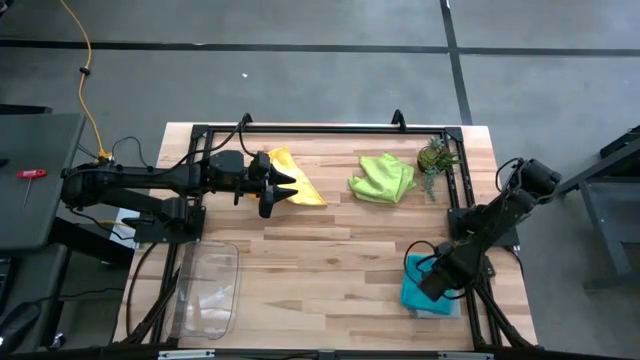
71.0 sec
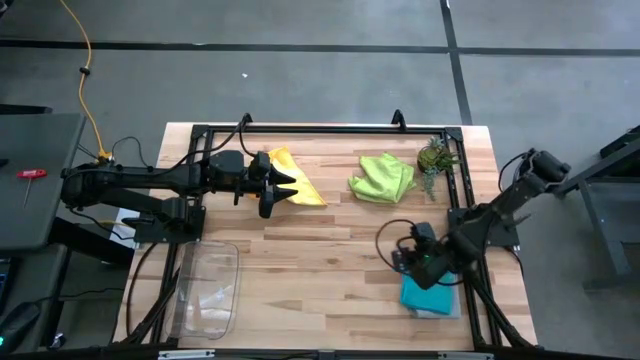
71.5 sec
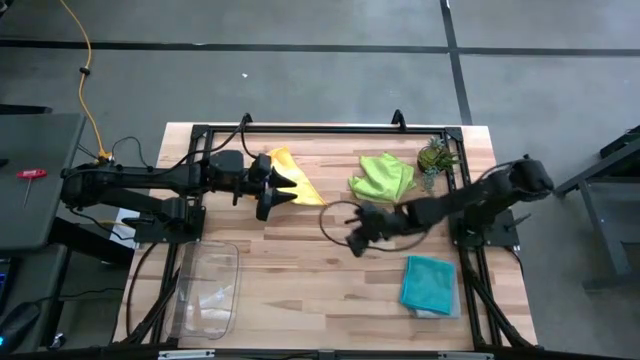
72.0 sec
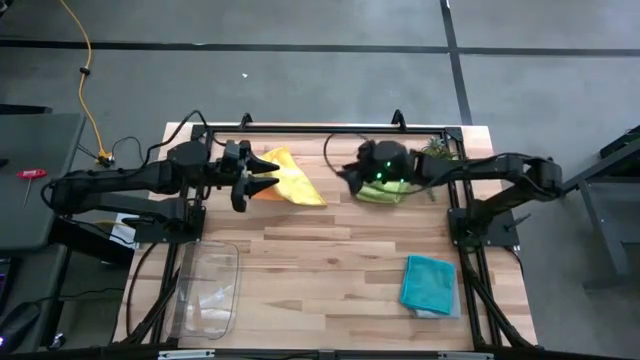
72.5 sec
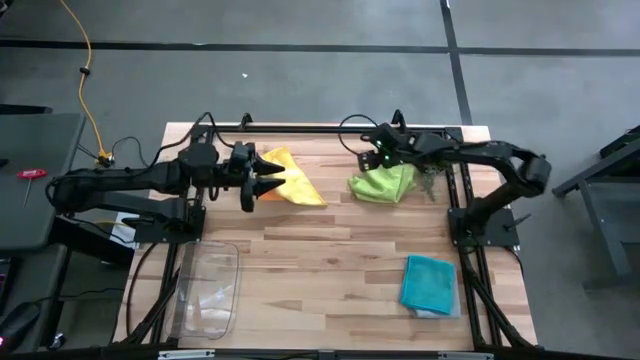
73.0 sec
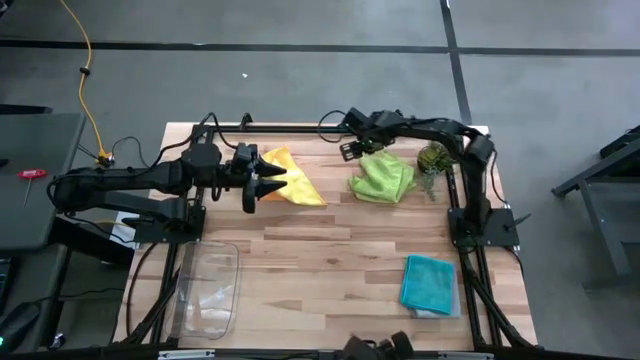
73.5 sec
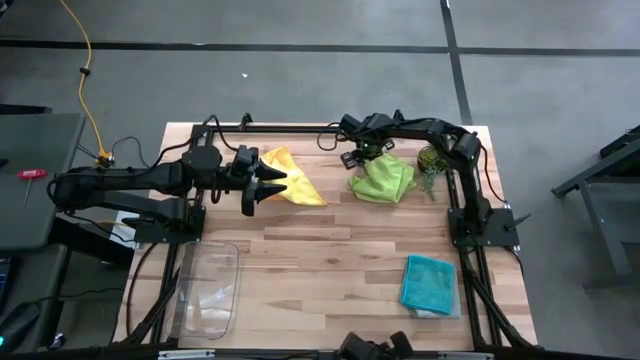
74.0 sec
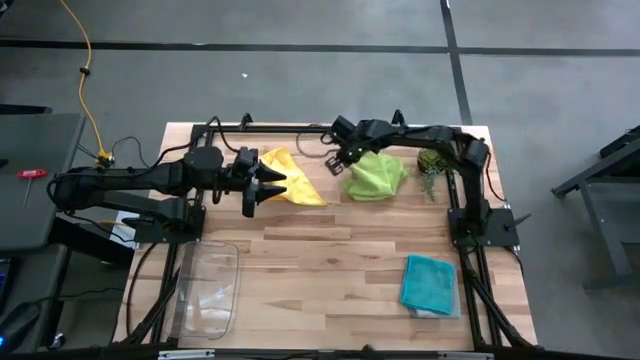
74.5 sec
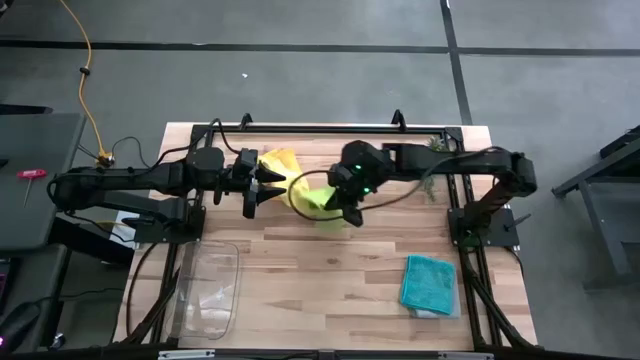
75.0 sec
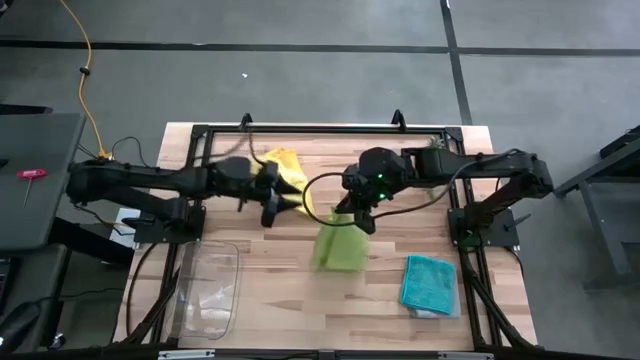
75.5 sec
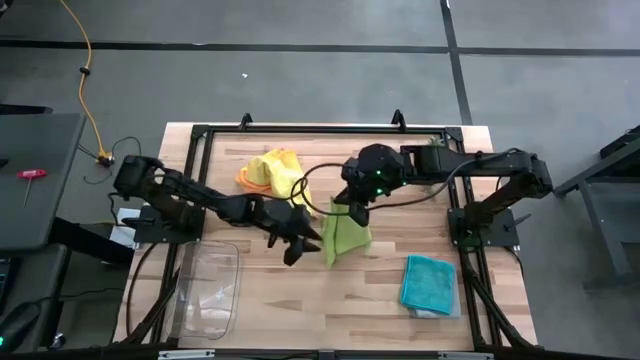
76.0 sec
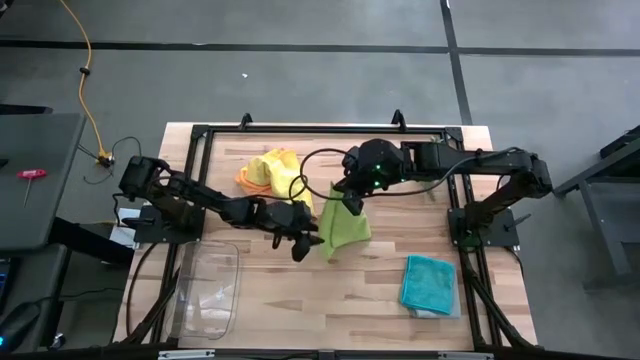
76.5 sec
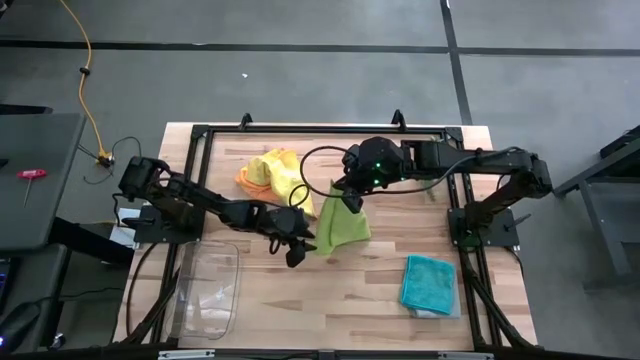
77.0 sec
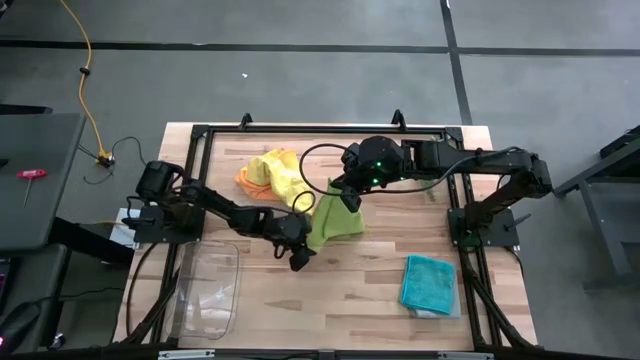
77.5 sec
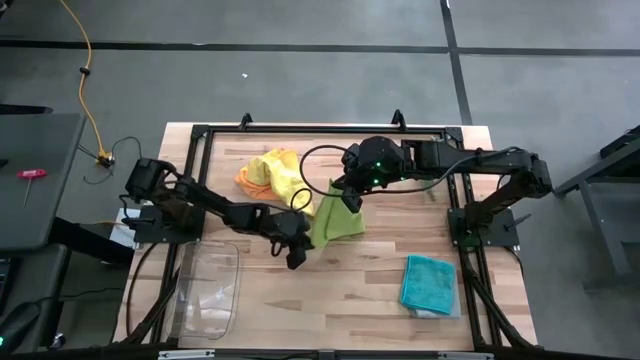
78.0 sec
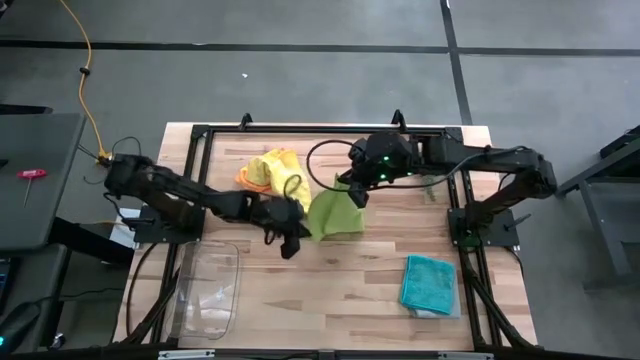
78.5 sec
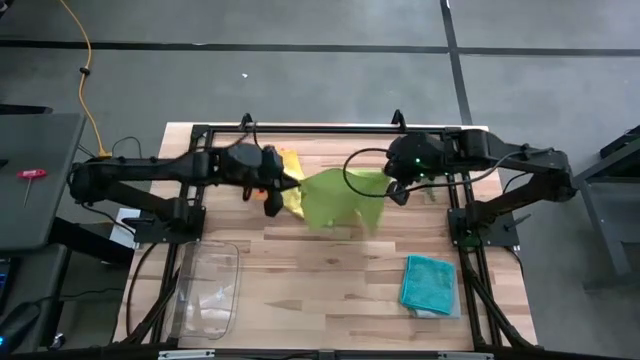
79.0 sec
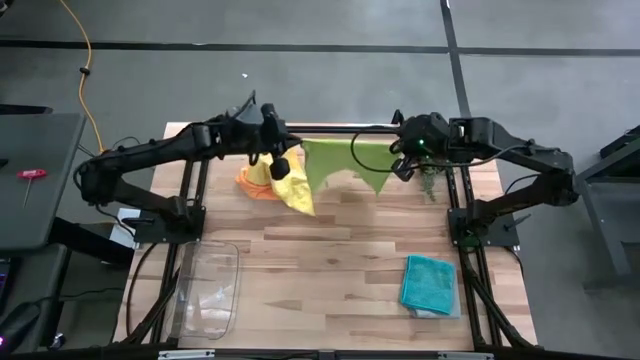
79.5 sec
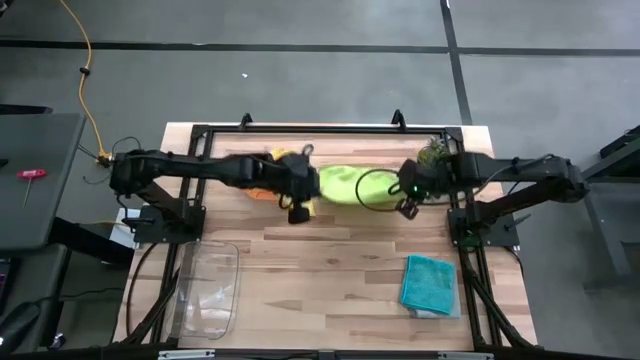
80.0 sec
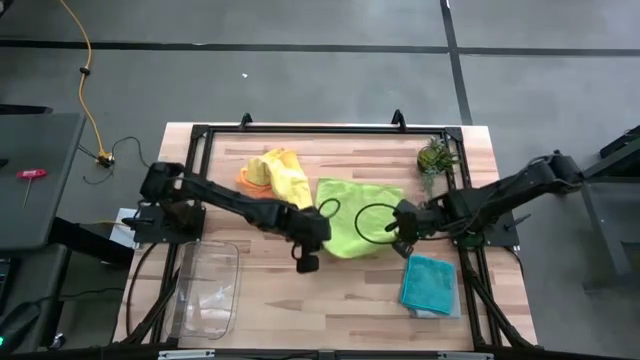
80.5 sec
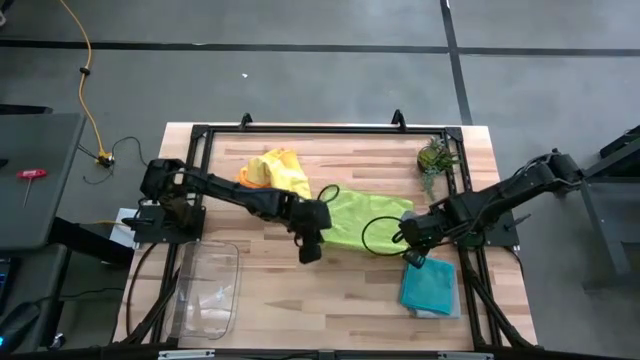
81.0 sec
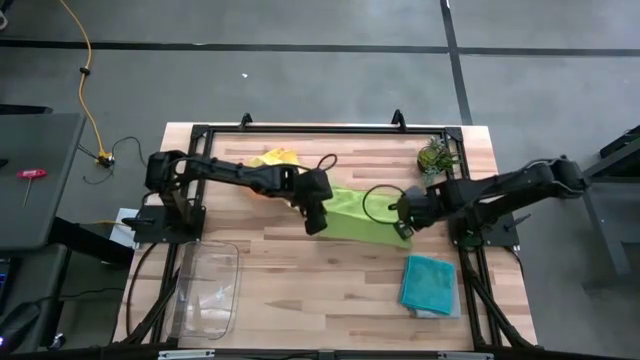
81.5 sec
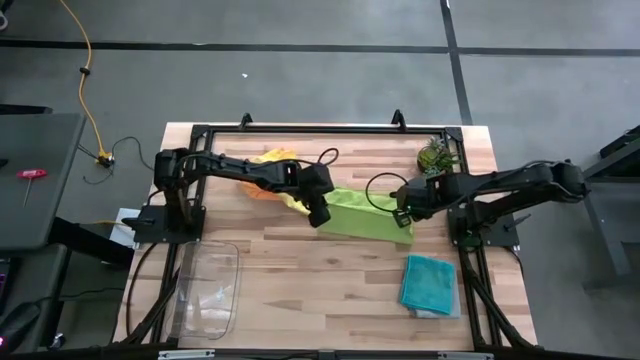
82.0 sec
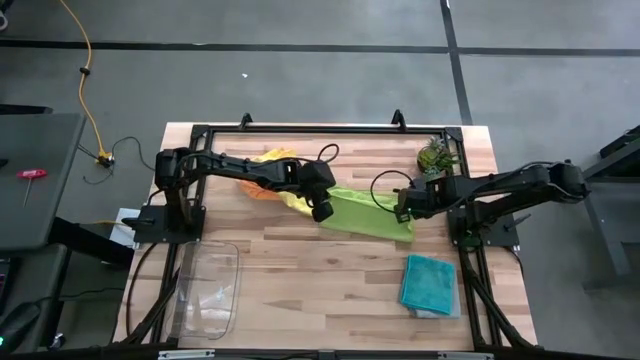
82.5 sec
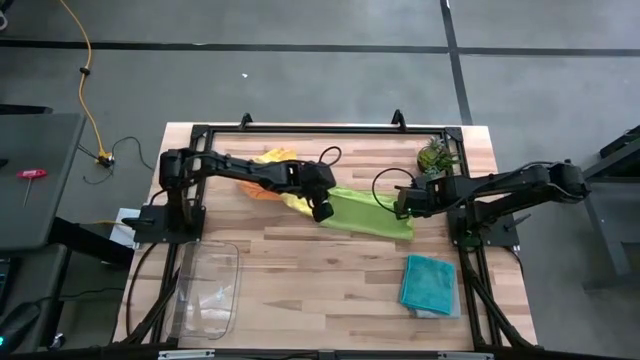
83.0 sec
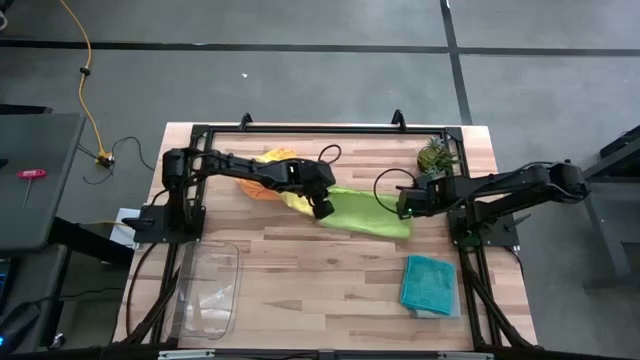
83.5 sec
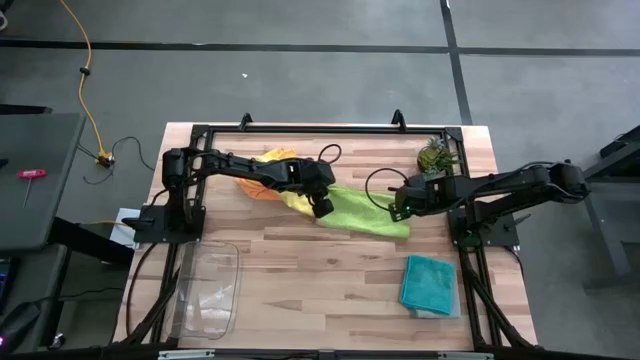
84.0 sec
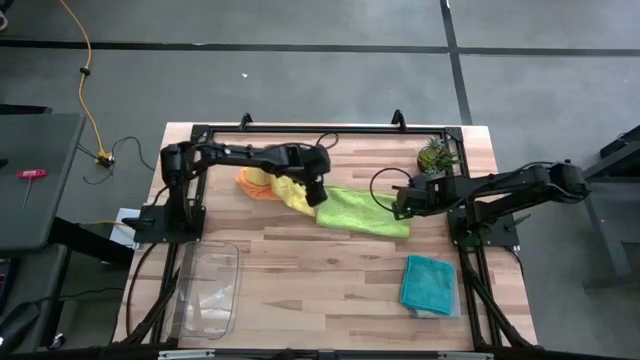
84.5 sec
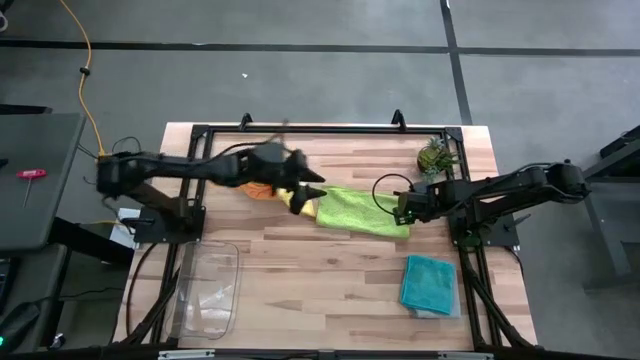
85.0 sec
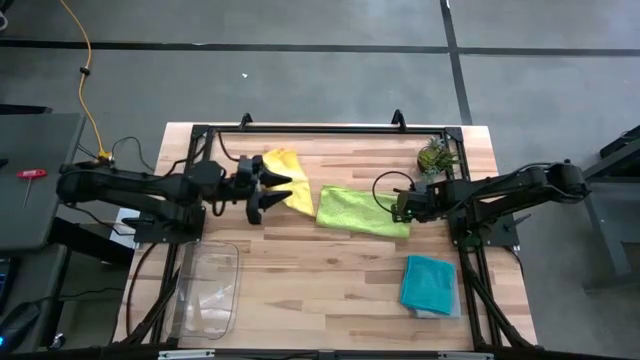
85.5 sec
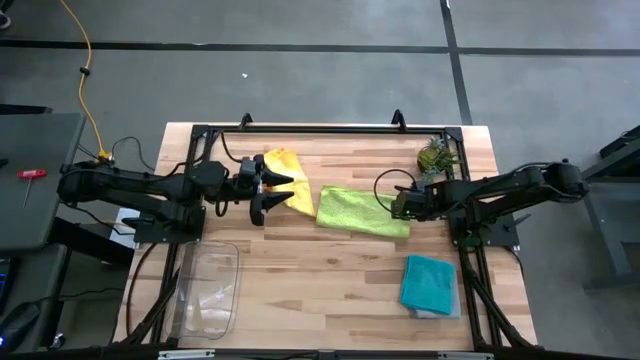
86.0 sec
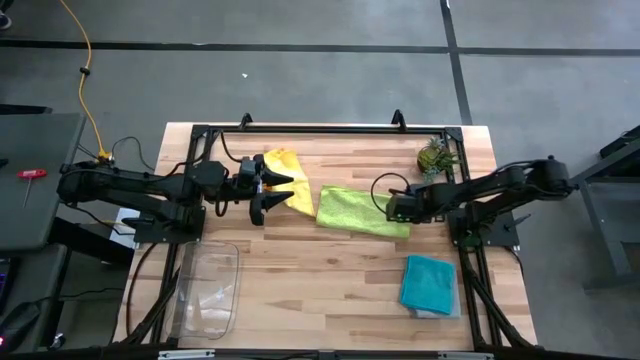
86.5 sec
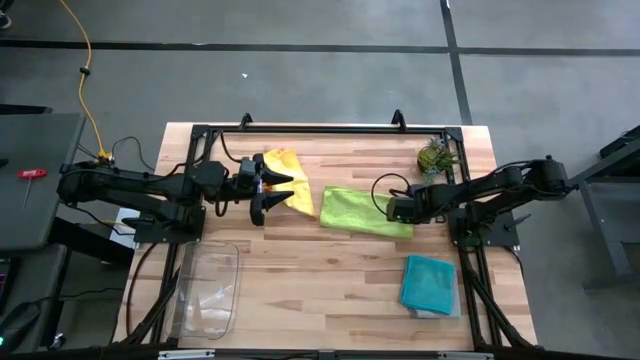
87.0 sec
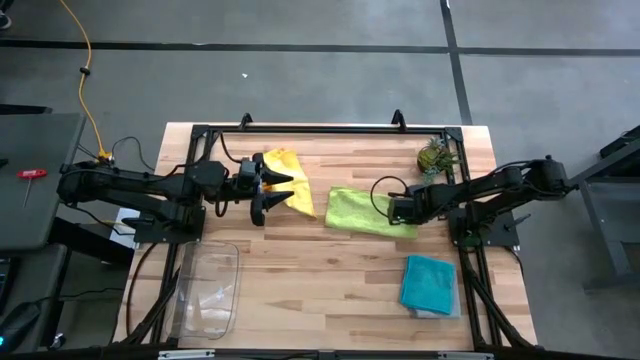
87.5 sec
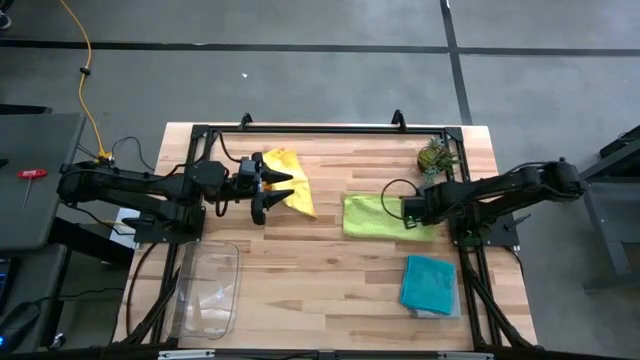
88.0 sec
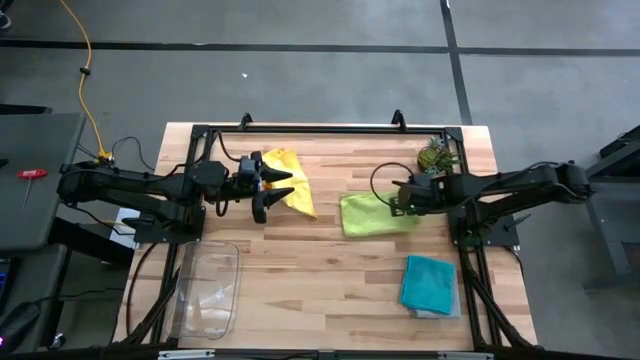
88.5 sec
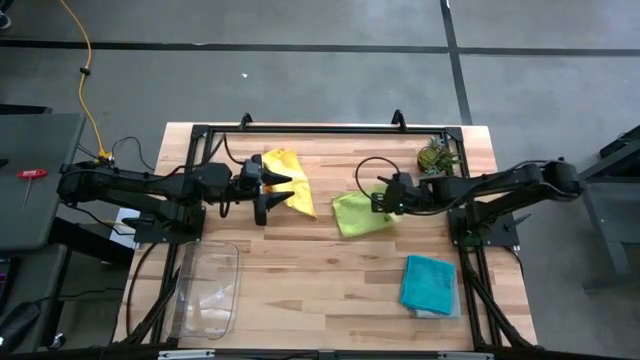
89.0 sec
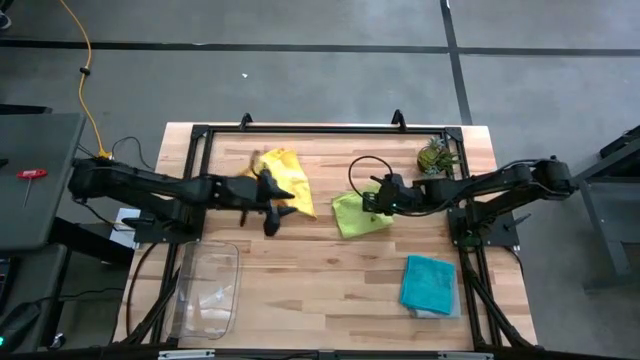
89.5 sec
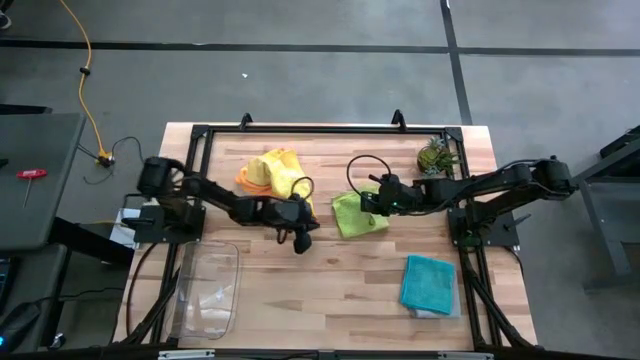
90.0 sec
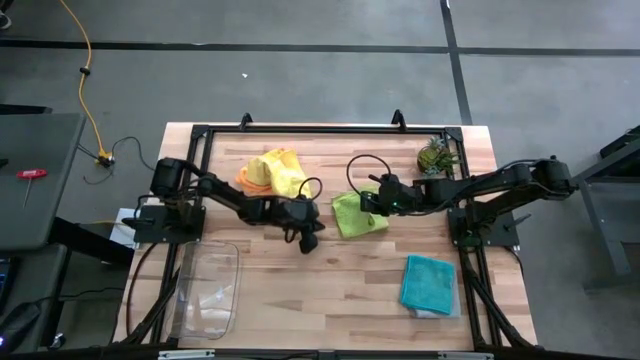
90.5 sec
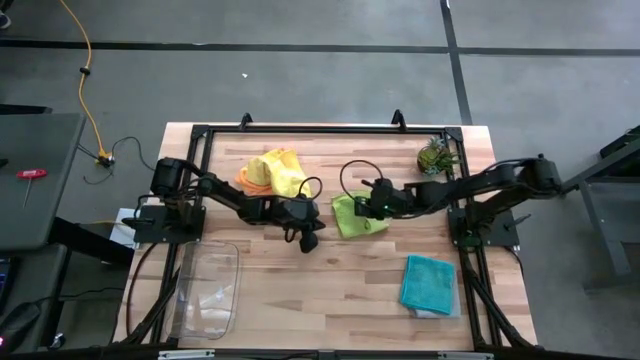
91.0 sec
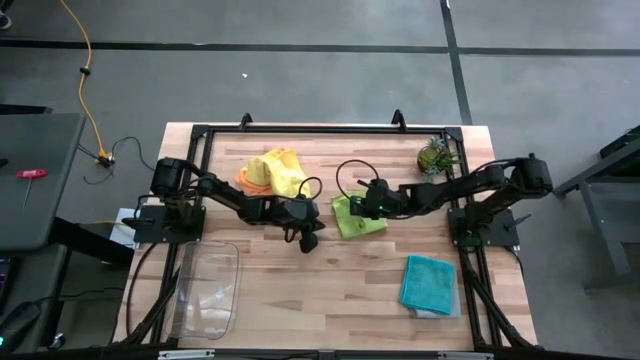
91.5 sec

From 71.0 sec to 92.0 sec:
Task: Fold microfiber towels
Fold the green microfiber cloth

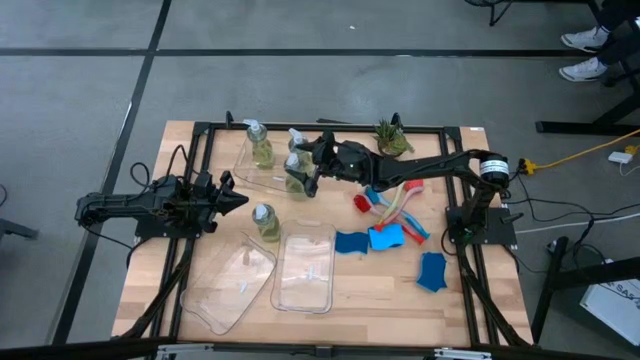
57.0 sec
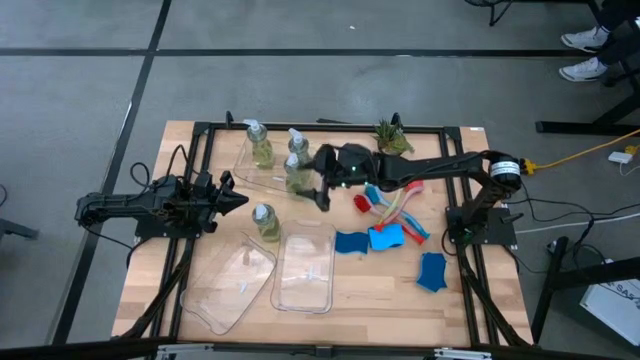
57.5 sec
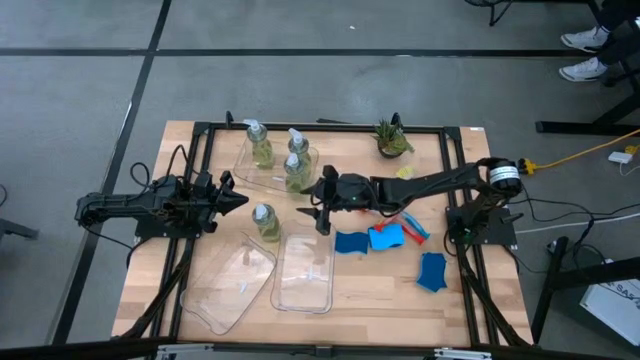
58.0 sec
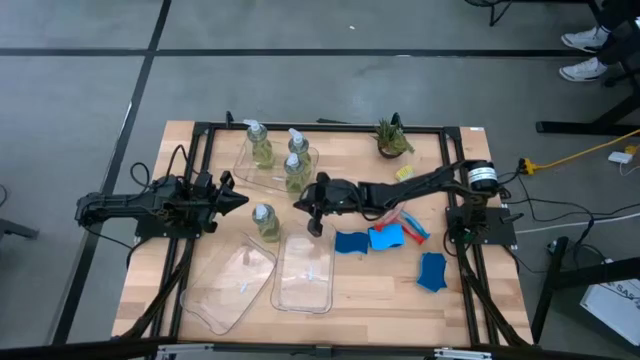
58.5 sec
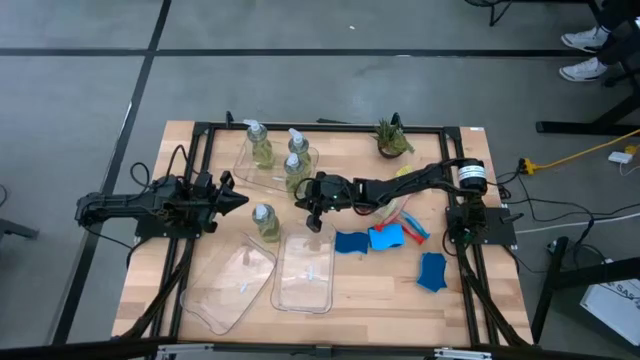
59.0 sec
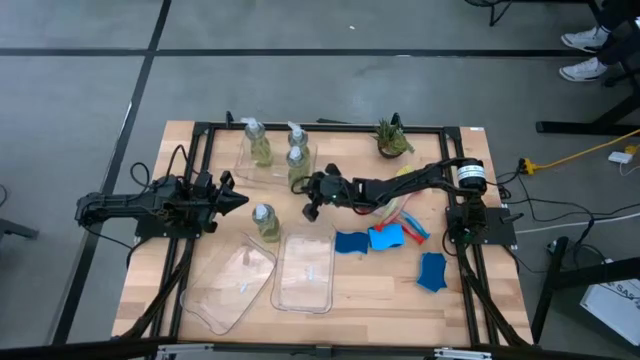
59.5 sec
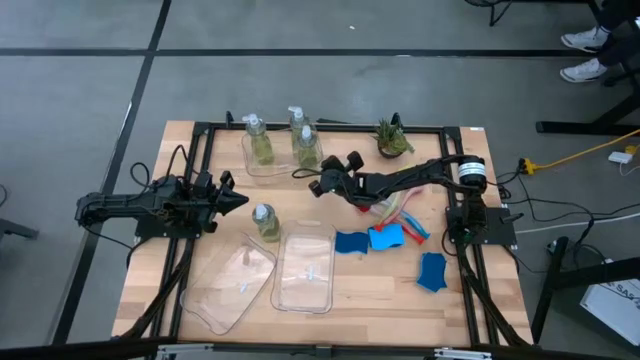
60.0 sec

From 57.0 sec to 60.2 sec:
Task: Pick & Place Kitchen Sink Supplies
Adjust the top transparent bin
